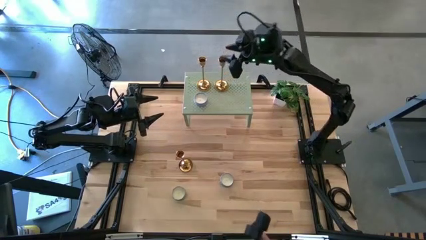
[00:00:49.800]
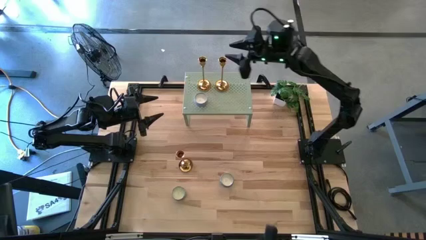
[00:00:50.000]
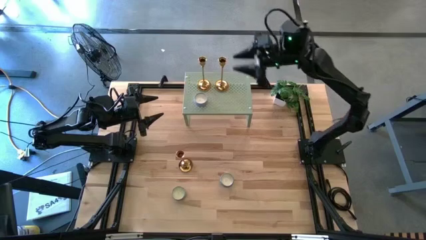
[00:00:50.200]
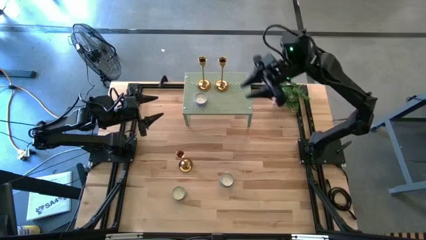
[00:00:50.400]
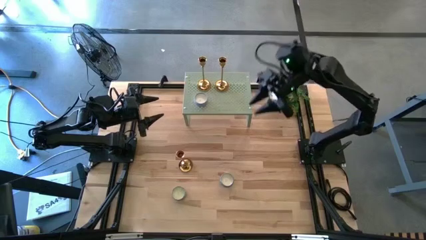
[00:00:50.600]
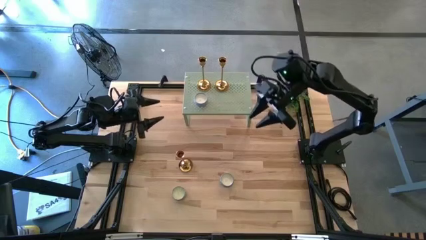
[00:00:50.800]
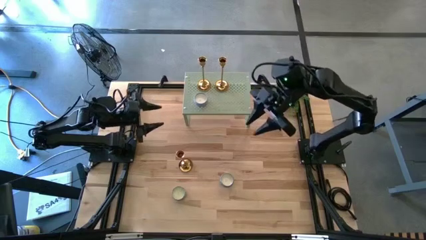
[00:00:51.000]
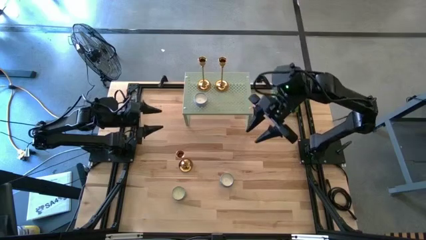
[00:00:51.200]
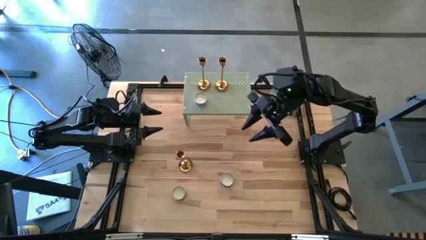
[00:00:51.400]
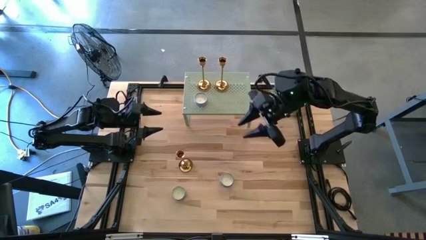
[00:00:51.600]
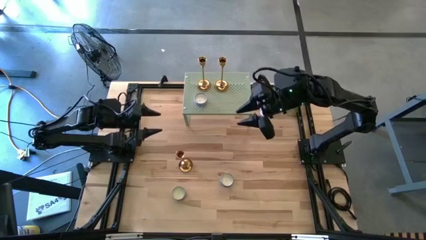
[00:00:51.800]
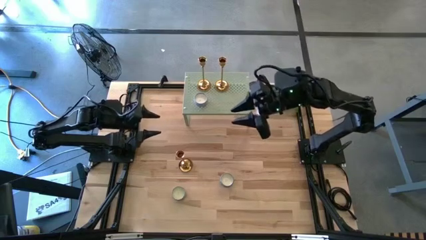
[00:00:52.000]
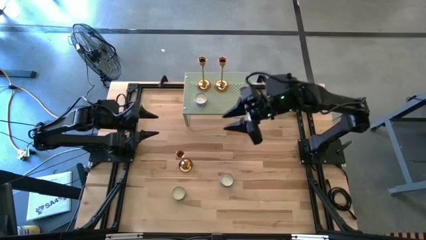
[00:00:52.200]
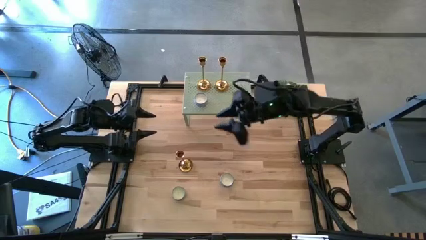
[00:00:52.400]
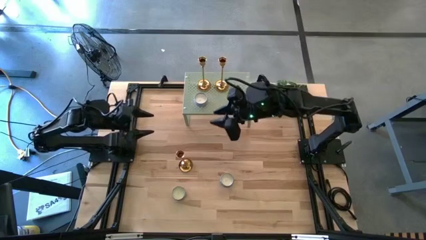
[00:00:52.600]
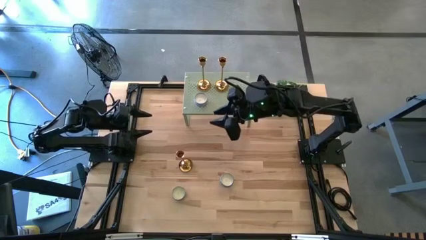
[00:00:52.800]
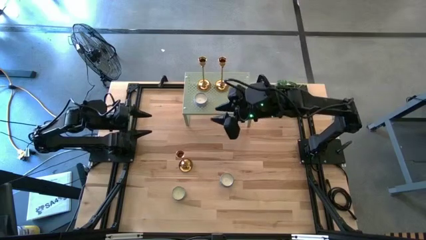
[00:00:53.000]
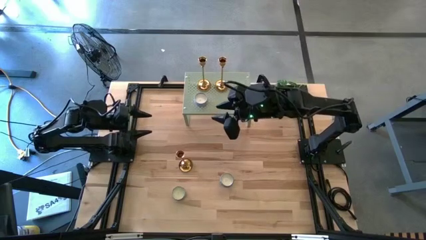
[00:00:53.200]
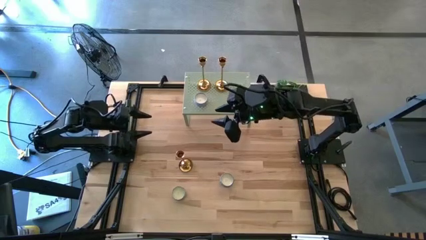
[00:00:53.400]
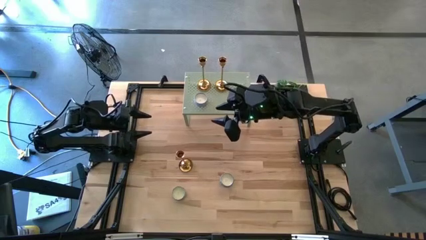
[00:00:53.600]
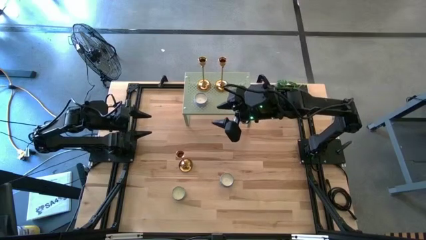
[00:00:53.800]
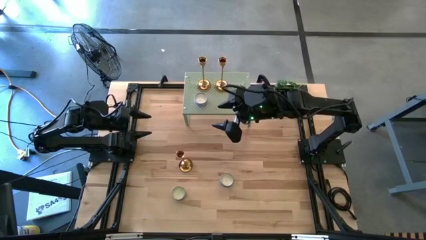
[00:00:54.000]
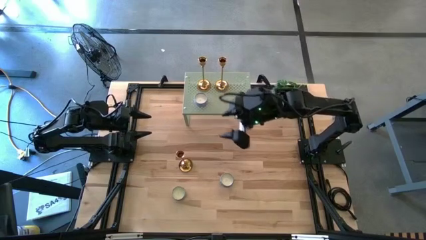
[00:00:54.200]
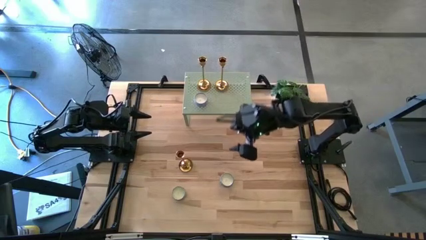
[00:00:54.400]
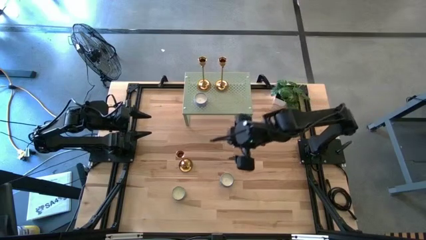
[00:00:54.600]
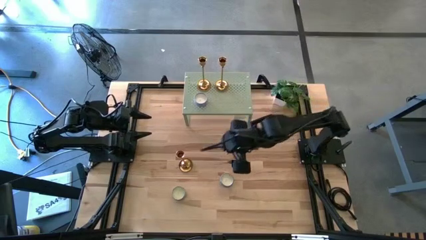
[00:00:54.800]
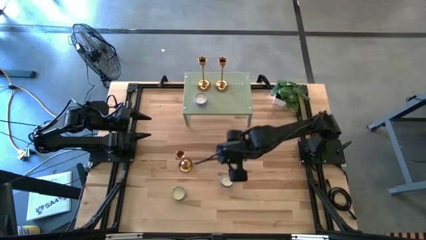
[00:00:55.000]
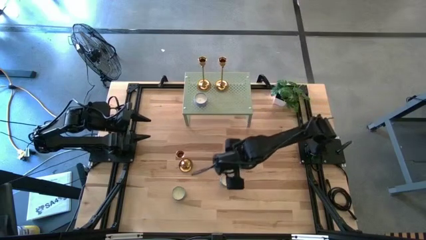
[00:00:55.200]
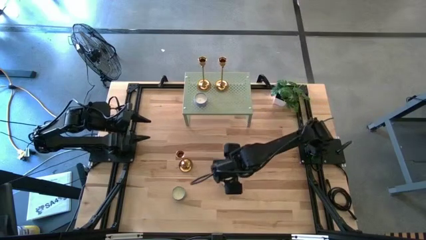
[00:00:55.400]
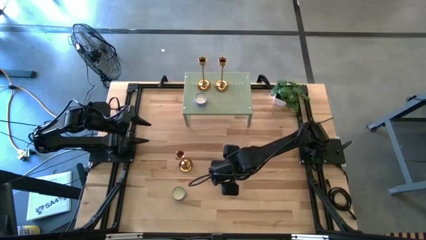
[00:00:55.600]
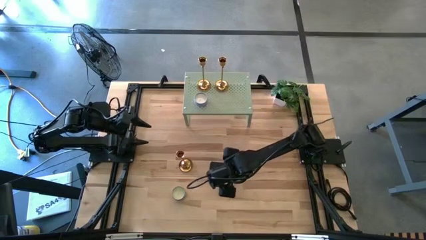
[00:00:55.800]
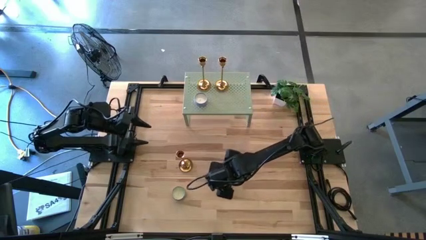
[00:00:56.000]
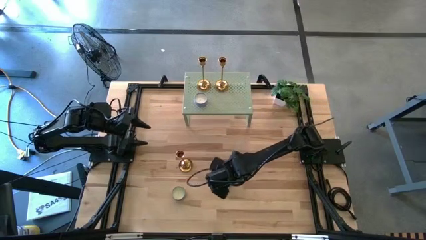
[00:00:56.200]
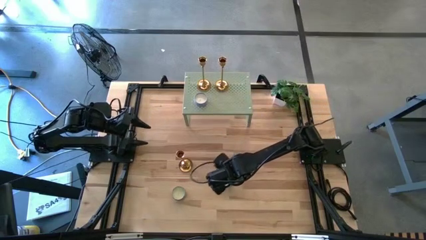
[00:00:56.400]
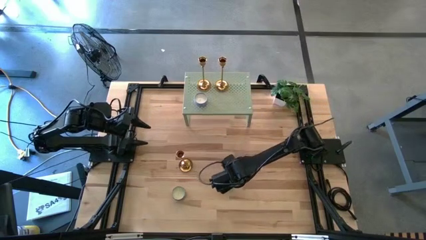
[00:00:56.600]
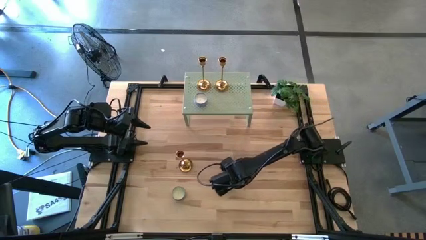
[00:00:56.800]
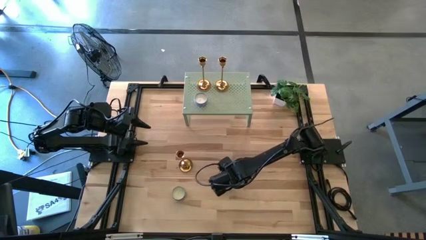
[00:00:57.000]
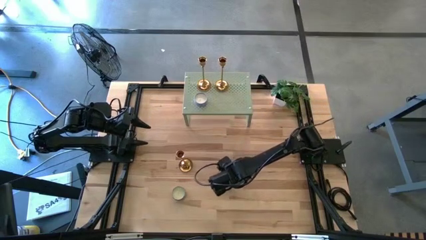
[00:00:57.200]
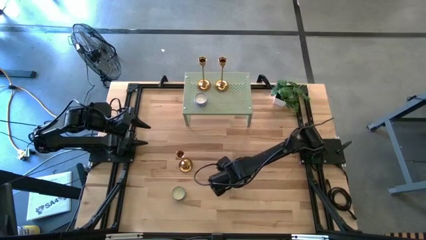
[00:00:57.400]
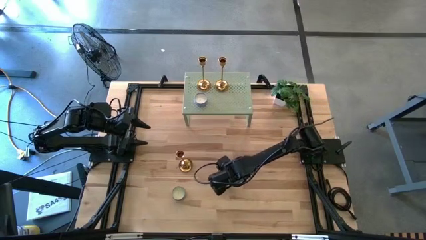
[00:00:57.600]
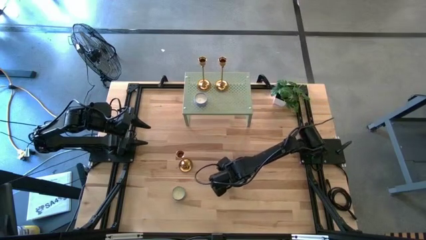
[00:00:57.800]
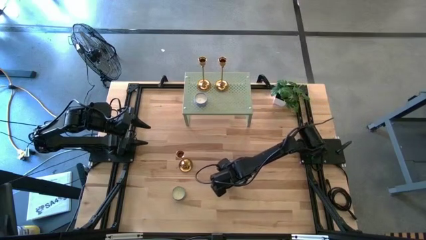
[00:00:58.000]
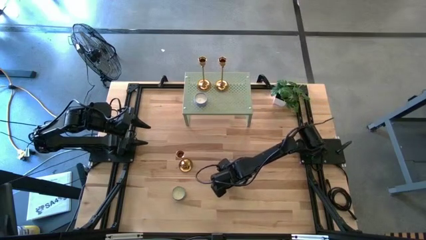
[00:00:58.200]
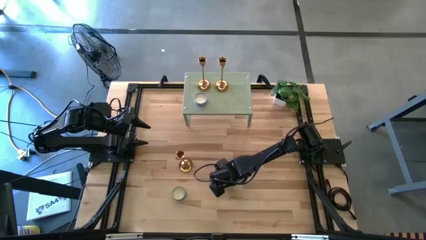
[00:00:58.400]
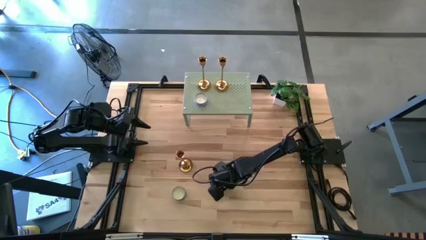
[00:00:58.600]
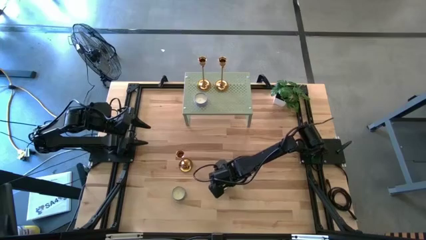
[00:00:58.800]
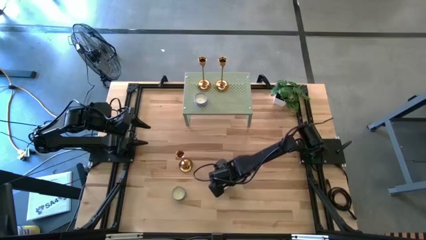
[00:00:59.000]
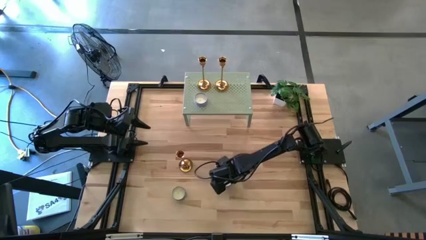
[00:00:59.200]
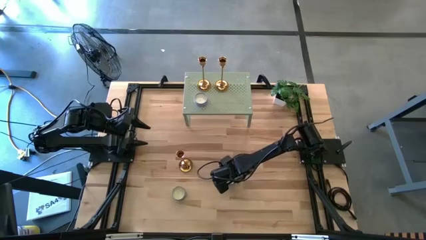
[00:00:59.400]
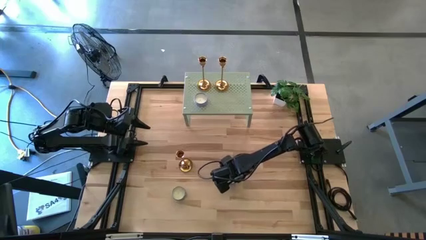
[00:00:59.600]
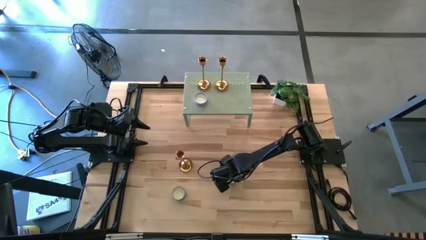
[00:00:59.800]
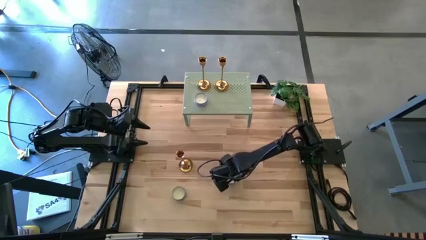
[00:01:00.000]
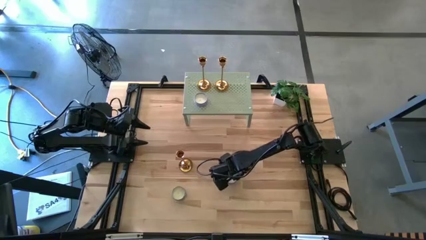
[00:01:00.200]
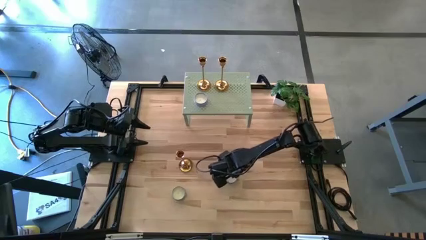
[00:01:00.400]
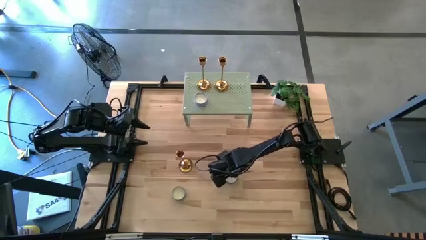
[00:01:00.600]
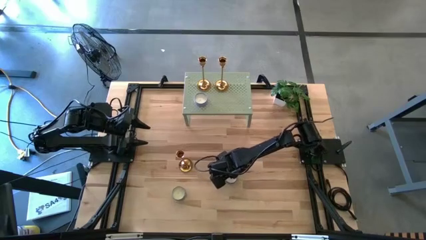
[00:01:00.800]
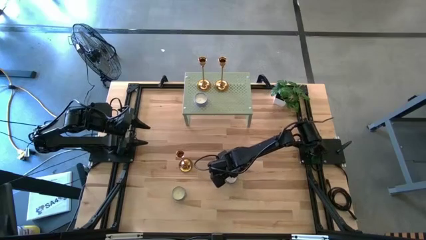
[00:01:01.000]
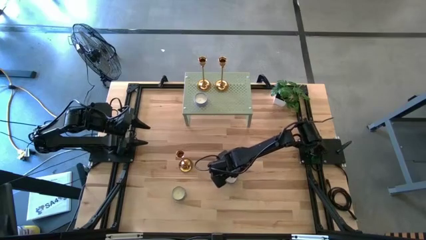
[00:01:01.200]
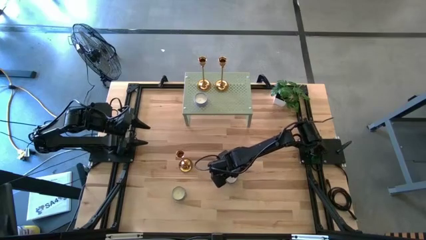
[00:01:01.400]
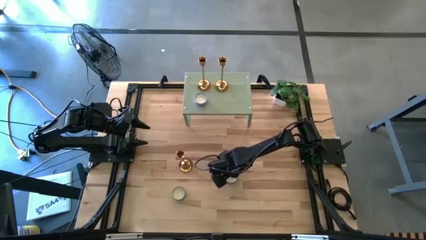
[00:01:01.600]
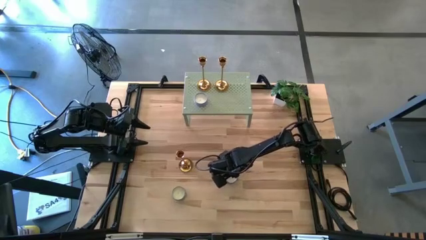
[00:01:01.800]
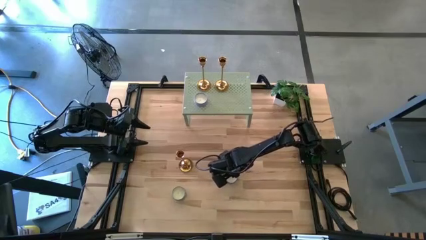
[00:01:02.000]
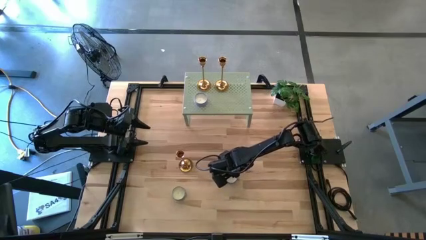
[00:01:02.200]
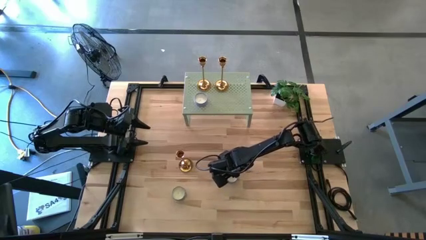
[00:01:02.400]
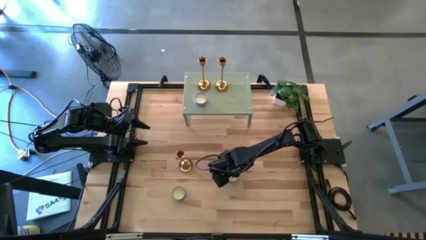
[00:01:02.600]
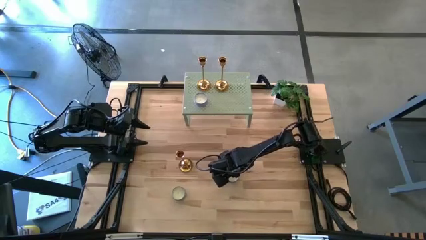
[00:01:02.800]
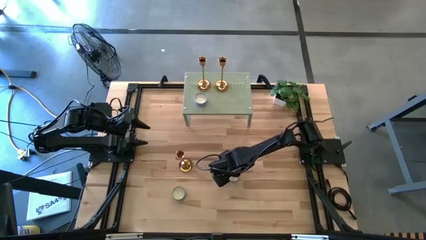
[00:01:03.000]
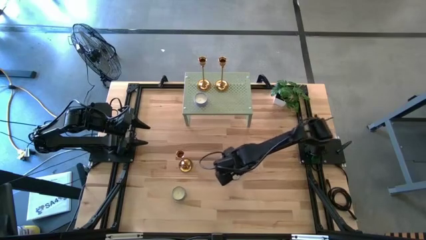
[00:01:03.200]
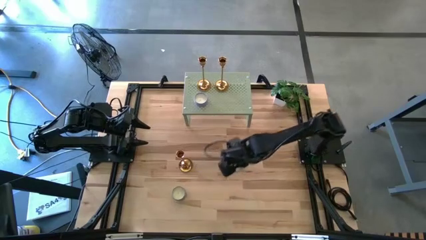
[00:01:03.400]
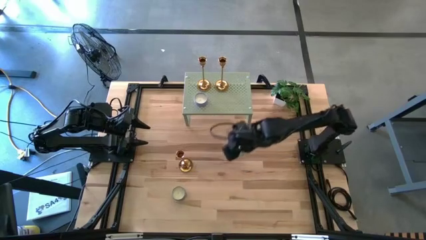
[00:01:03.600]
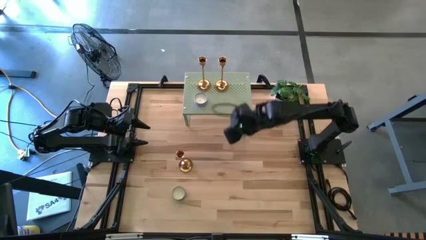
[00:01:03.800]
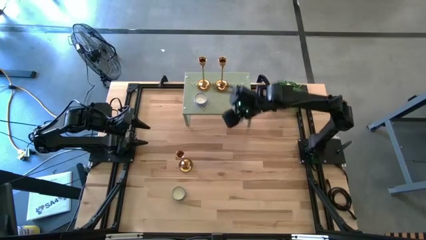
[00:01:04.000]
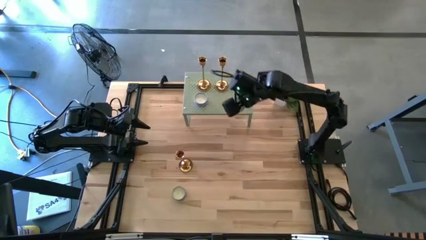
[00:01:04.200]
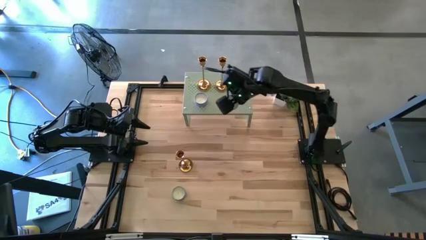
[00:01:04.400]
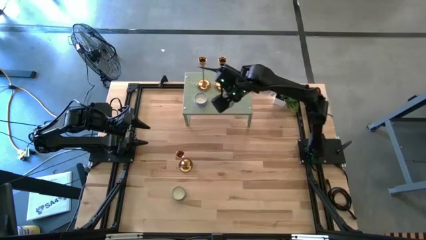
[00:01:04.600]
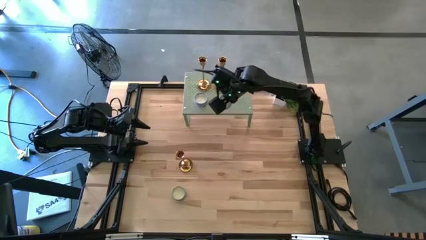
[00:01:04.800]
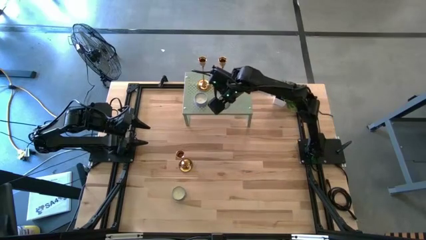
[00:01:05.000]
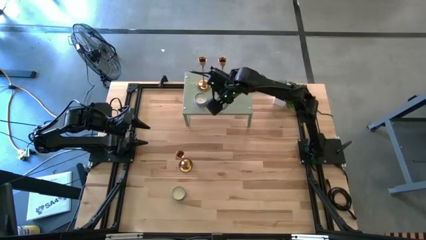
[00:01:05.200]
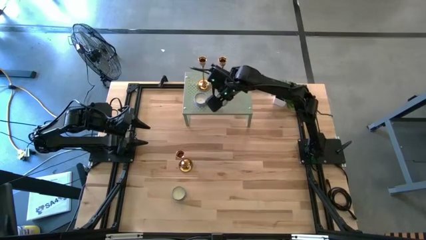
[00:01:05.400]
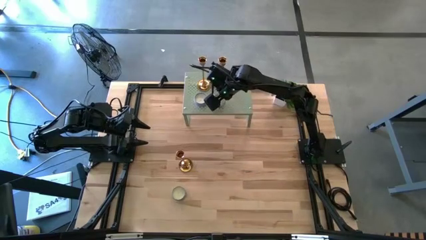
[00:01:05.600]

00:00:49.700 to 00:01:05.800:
Task: Pick & Place candle stick holders
Put the right blue scented candle on the shelf
